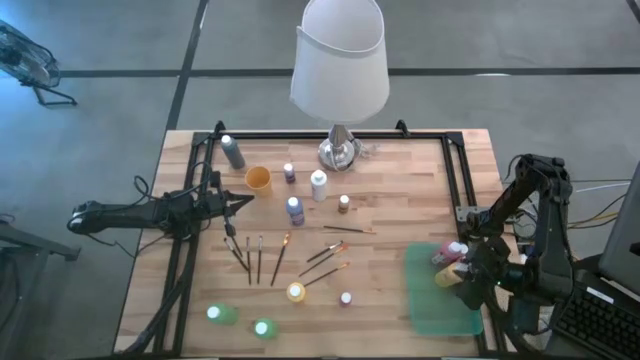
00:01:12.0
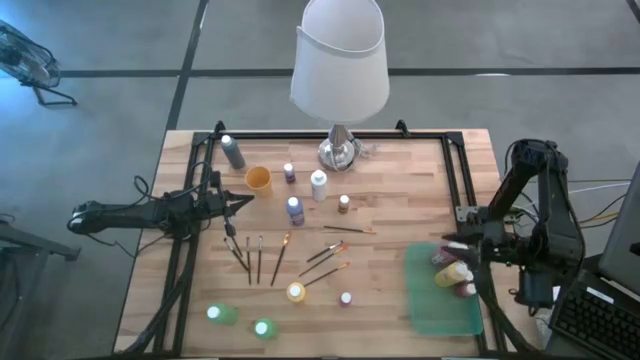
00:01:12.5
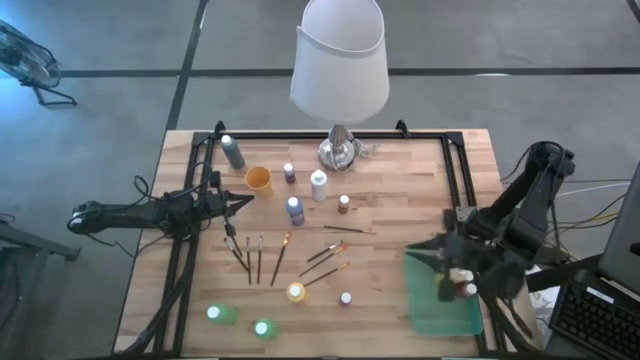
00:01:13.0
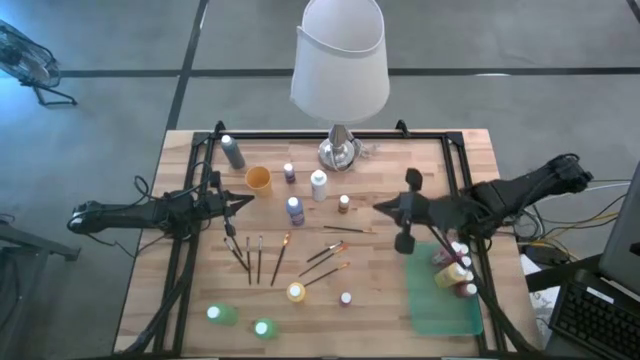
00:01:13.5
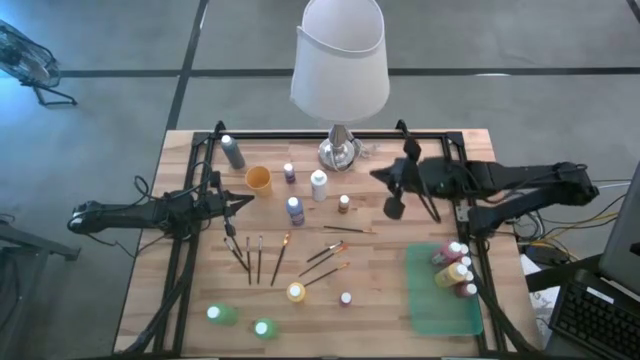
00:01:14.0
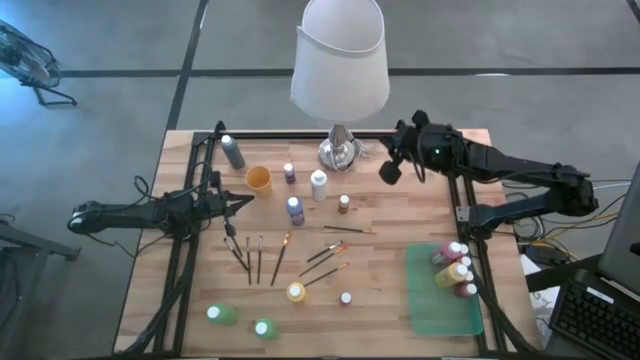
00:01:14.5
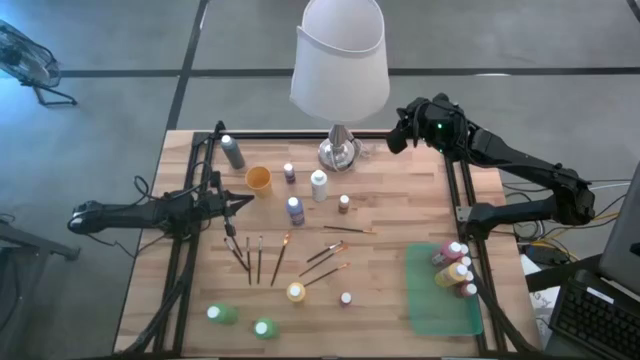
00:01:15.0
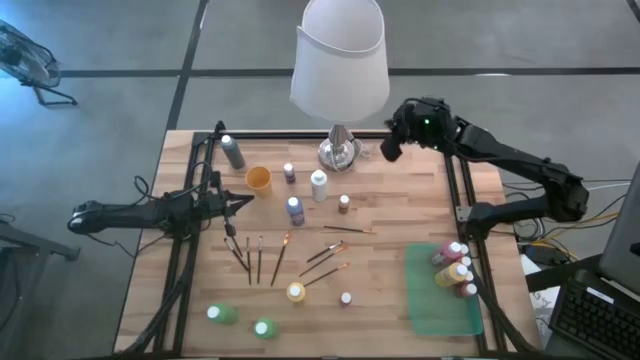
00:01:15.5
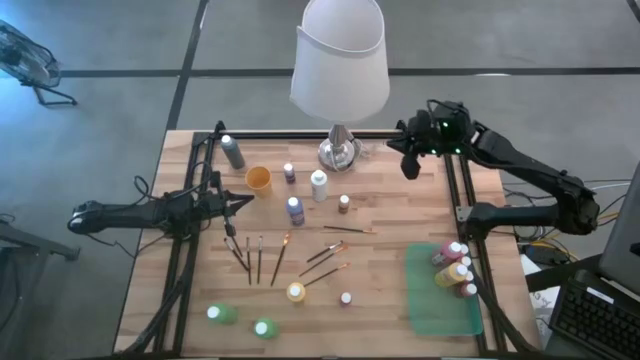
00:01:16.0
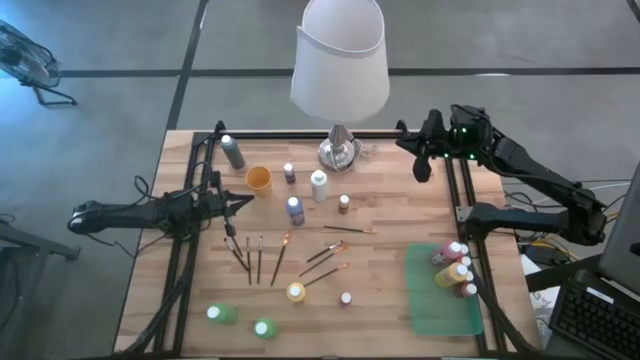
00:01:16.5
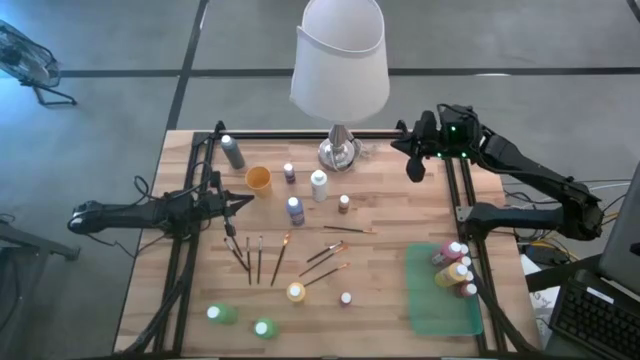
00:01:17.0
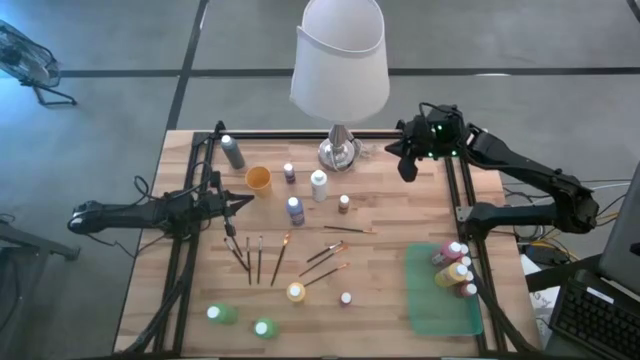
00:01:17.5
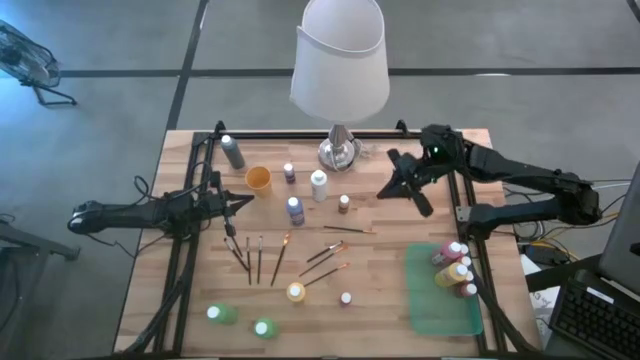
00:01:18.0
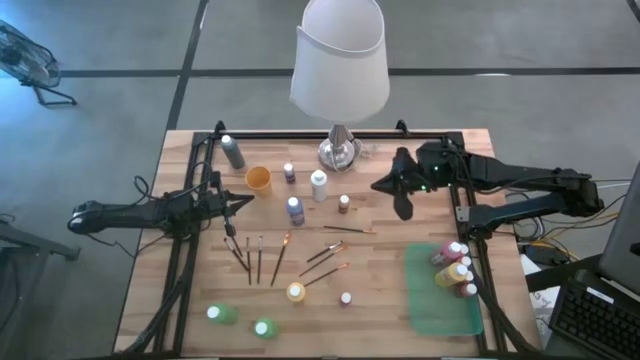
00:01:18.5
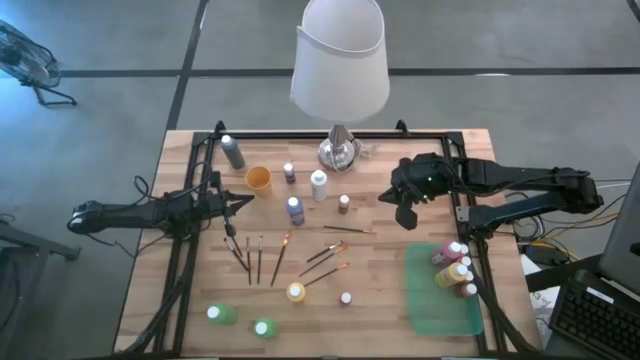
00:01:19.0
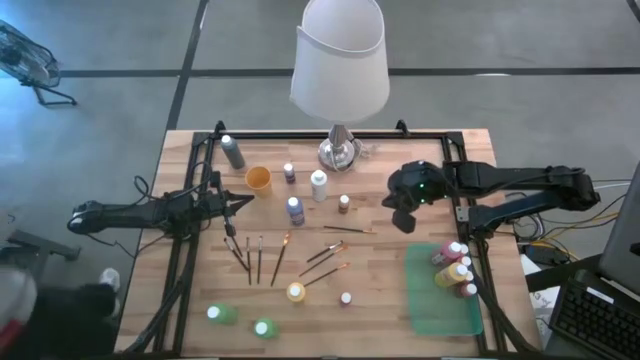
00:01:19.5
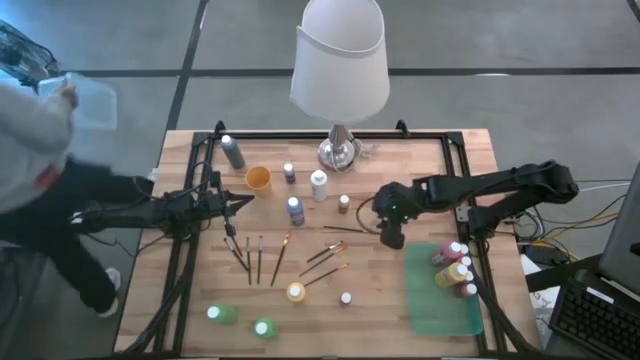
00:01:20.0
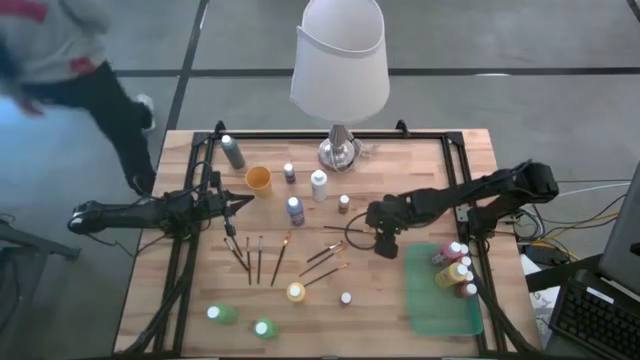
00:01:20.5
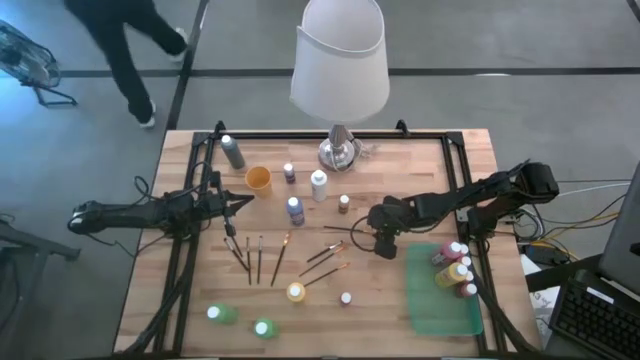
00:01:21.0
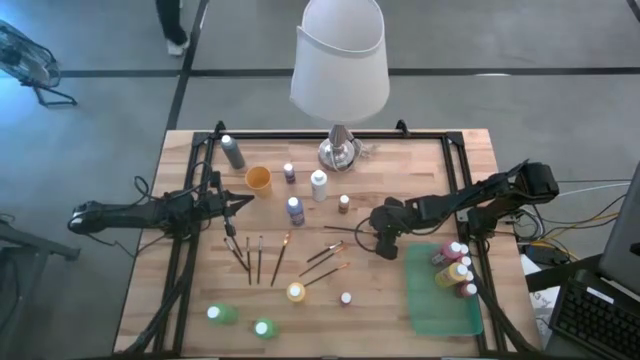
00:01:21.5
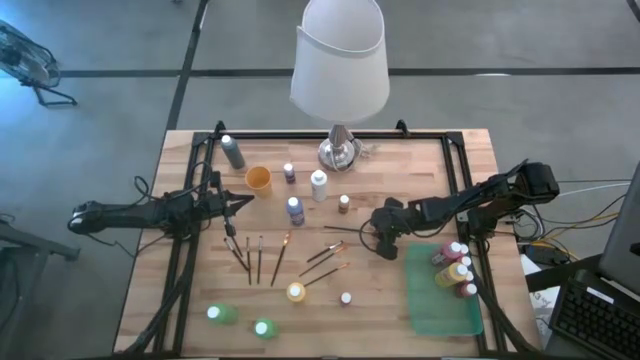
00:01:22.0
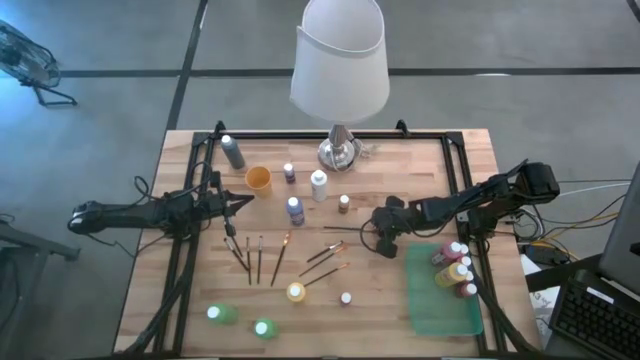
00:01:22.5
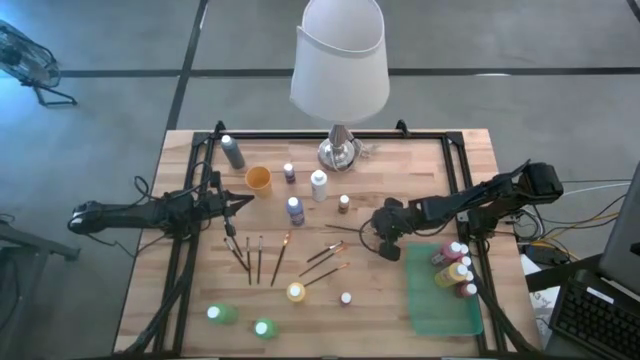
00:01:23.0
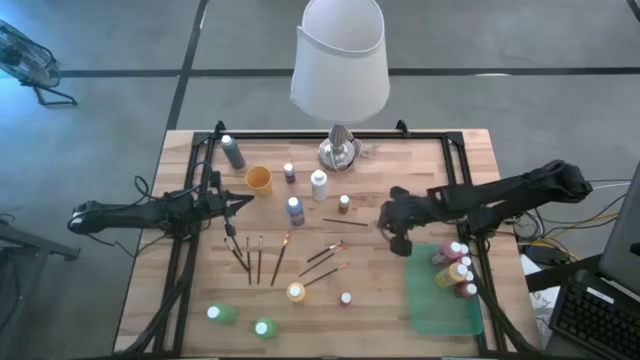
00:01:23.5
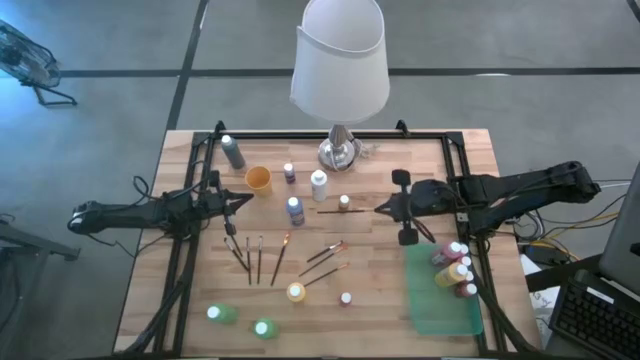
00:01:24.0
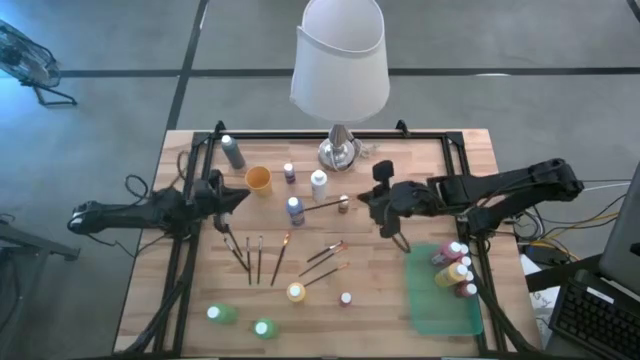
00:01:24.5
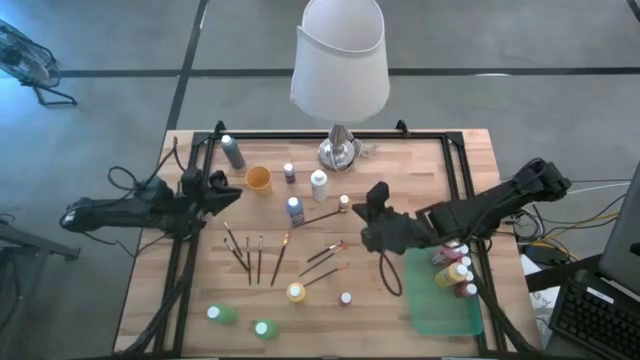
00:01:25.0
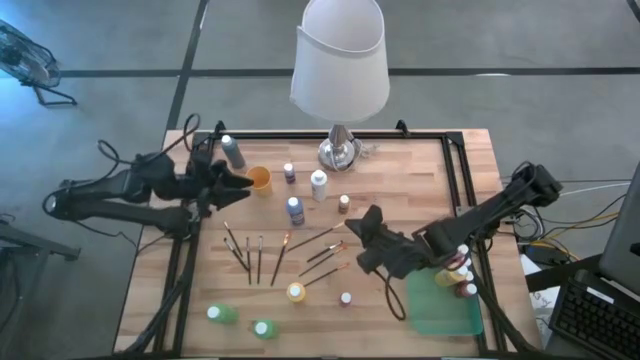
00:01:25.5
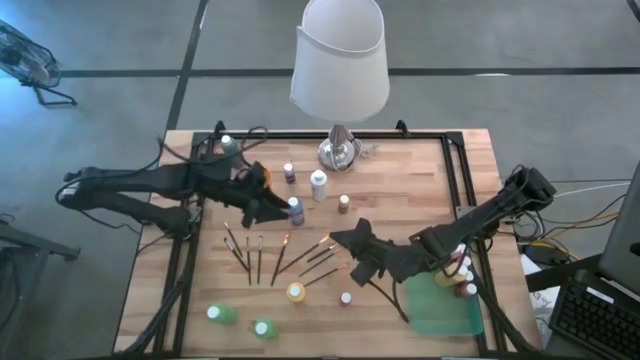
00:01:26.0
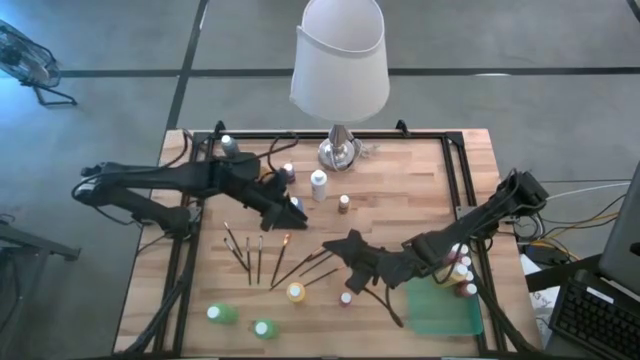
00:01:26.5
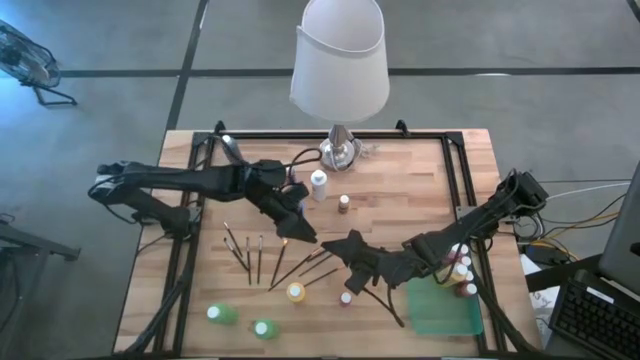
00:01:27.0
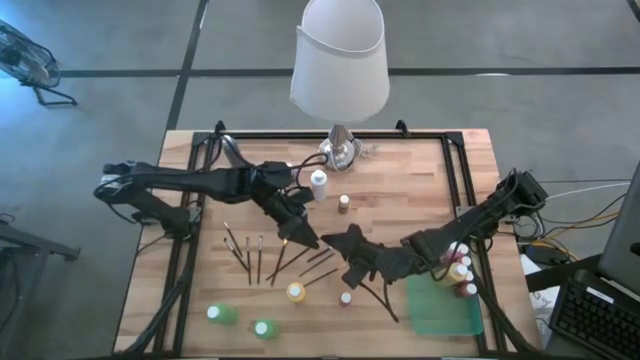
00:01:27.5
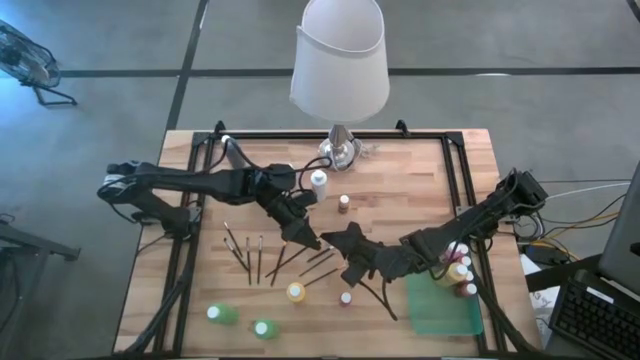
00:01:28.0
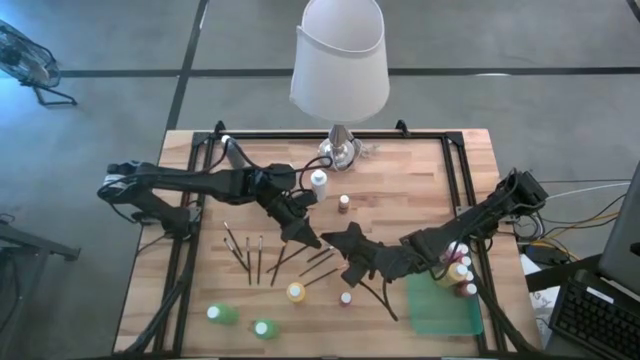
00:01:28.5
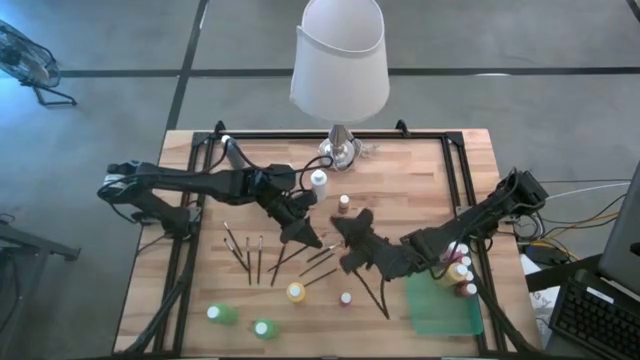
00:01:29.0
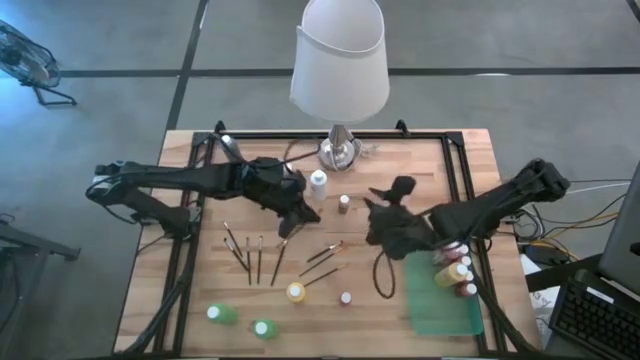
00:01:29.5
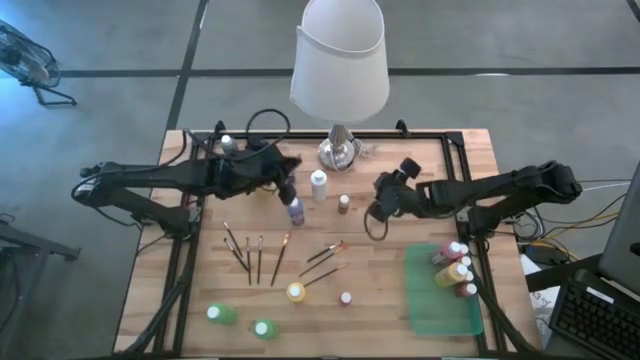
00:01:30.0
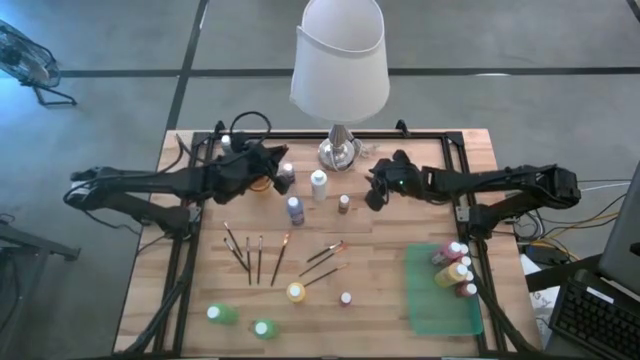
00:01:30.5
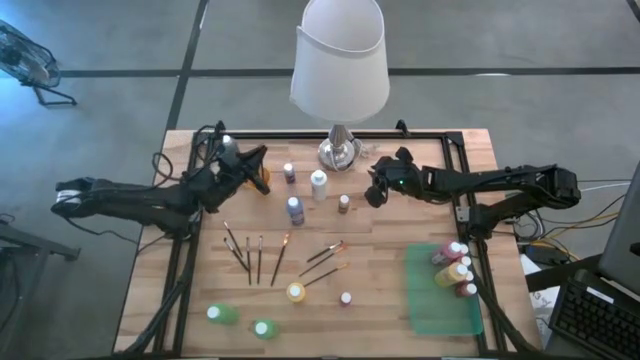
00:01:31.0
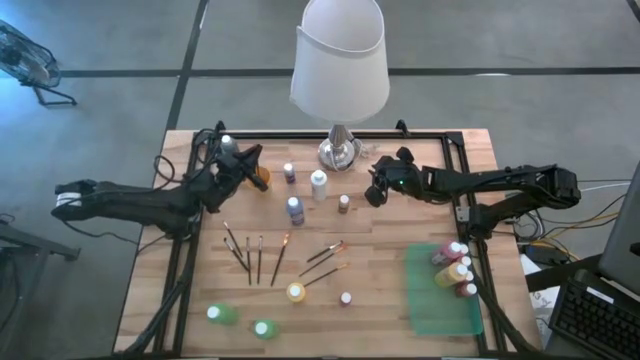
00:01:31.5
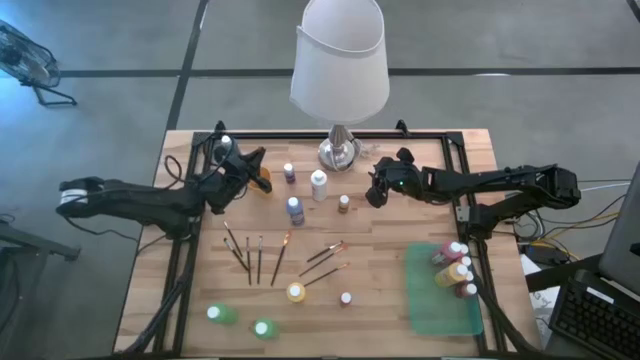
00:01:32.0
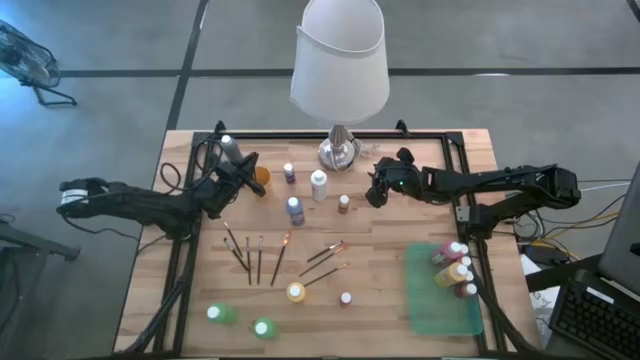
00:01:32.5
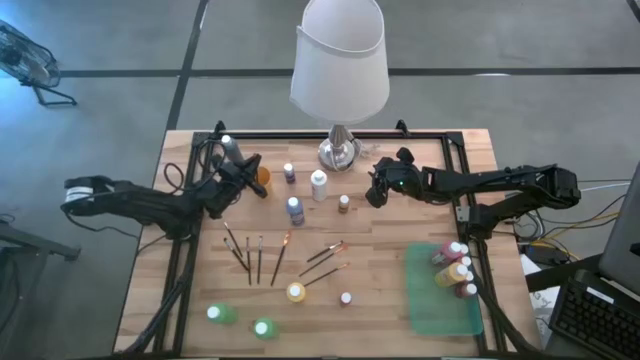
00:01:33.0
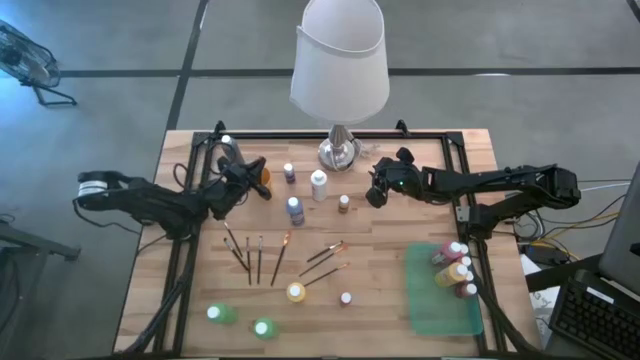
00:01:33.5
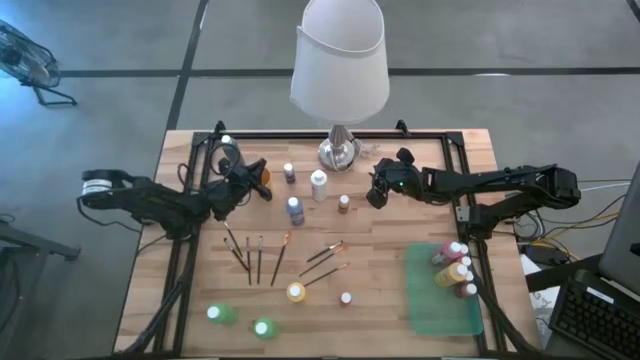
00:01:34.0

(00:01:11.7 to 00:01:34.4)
Task: Pick & Place Paint Supplies
Put the gold paint brush into the yellow cup
